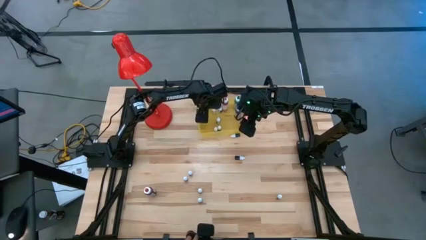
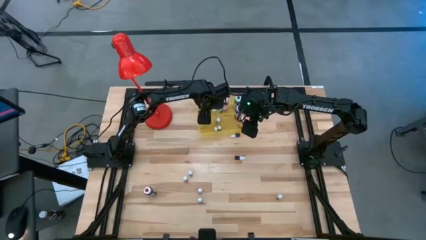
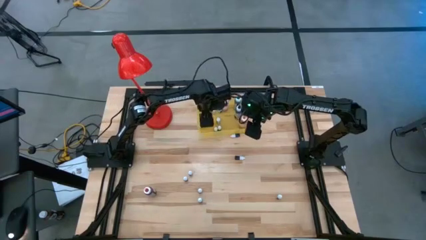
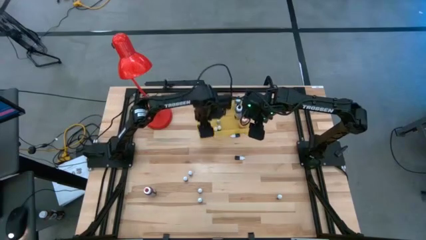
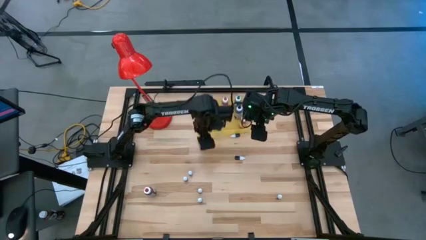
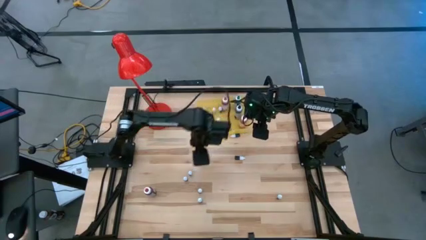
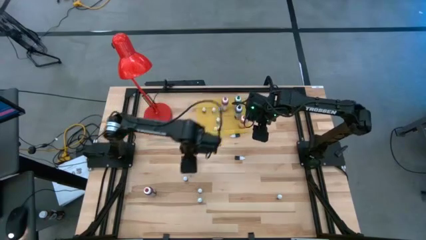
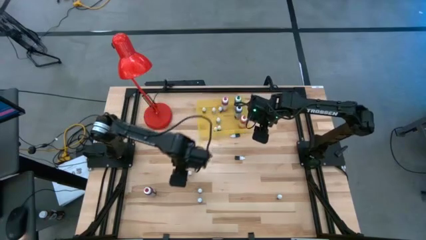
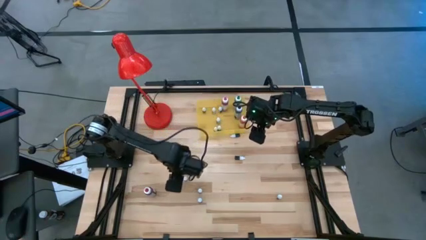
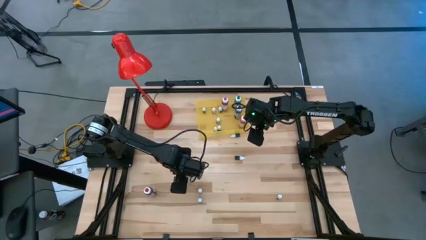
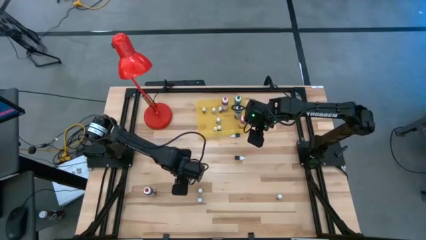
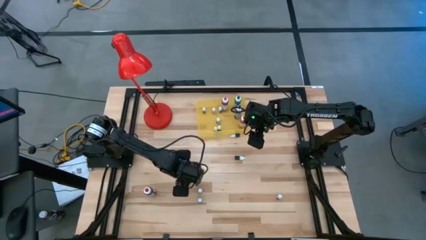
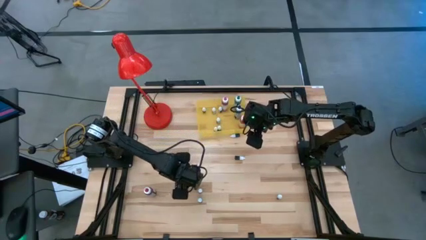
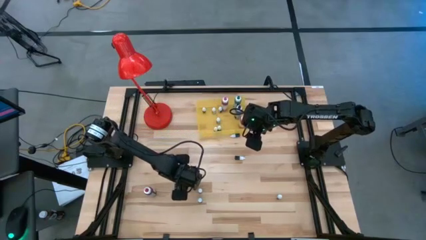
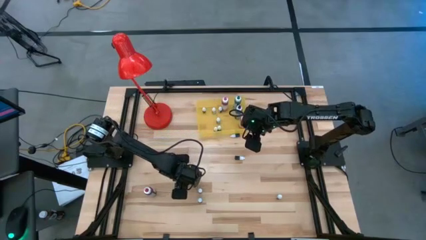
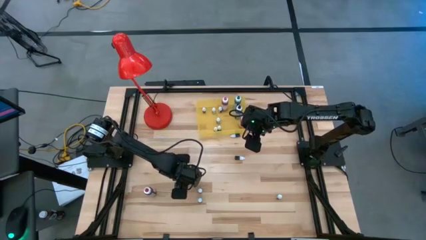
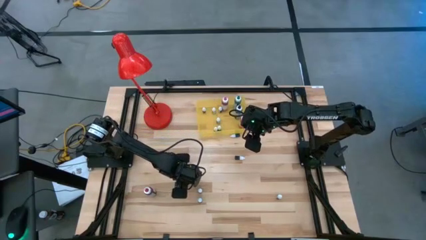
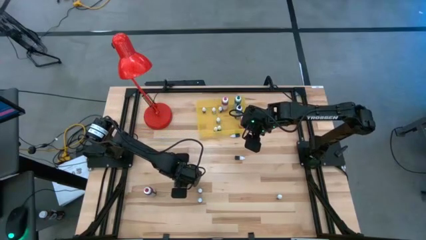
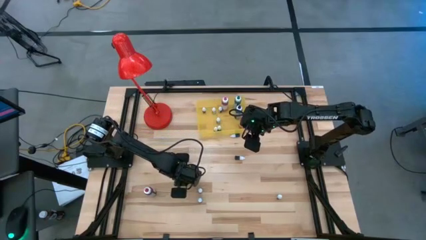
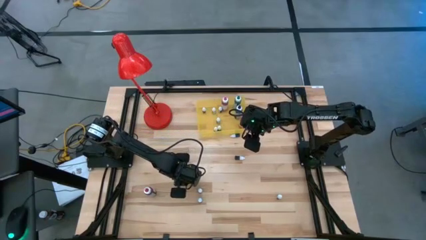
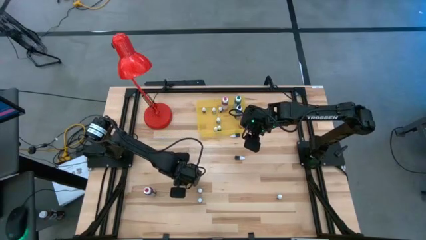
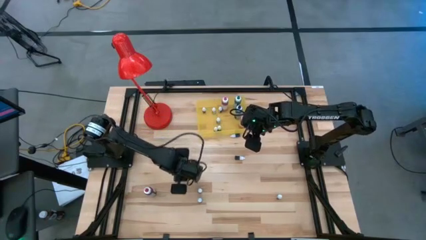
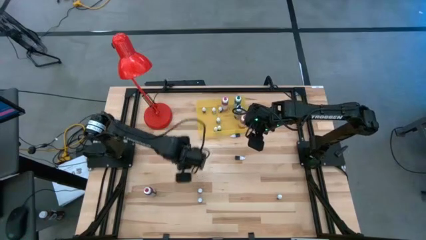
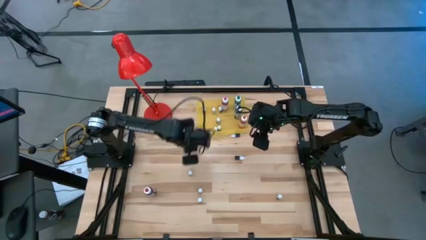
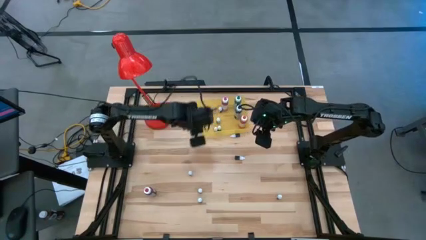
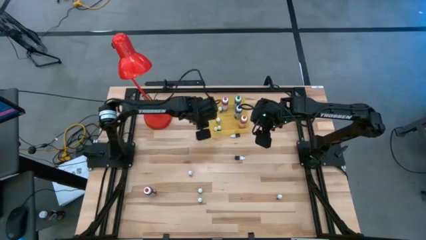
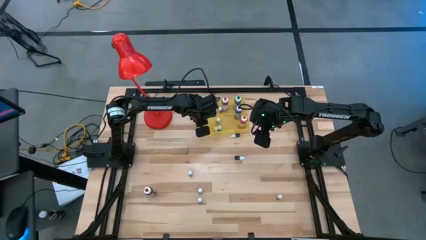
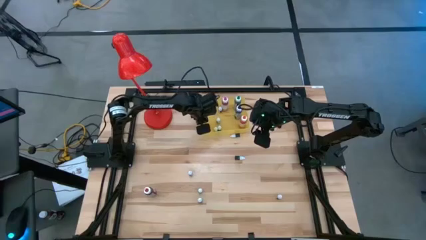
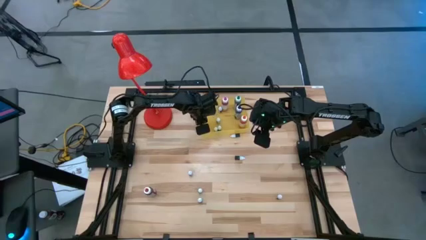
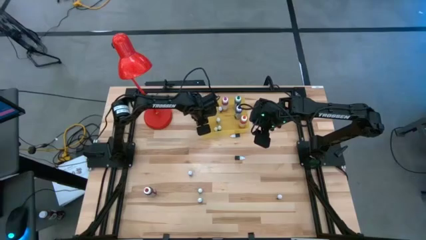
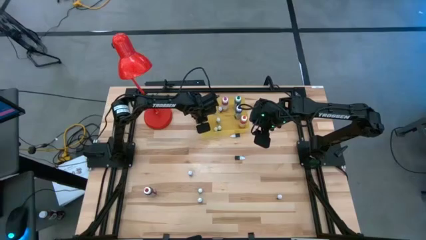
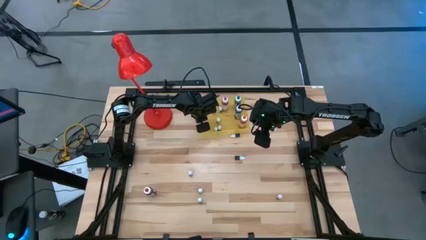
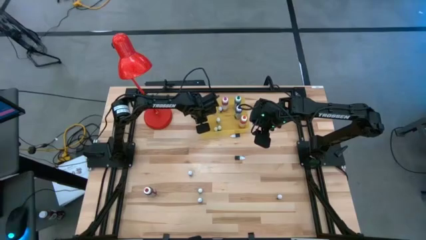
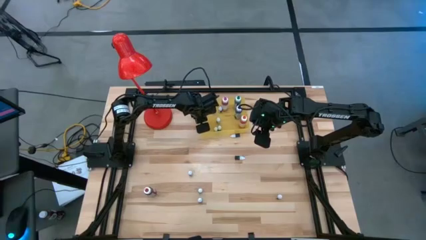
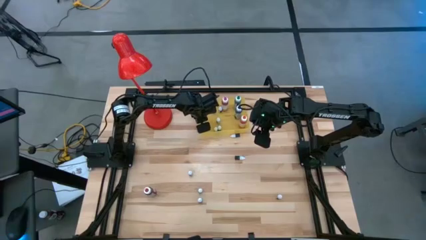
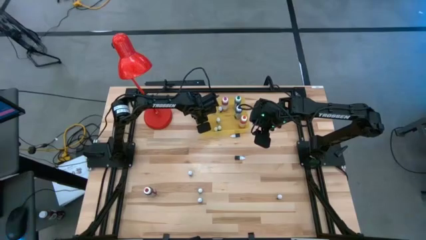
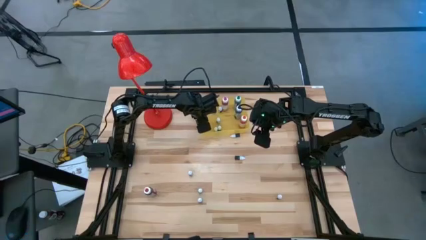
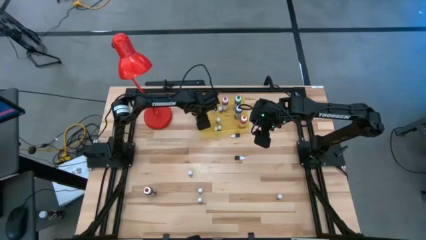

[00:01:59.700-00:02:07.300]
Task: Pick & Place food coloring
Put the small red food coloring bottle into the yellow bin

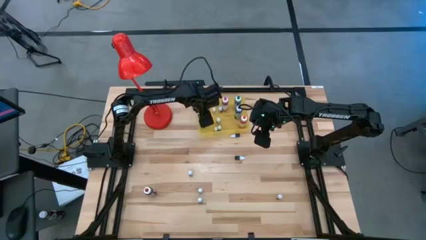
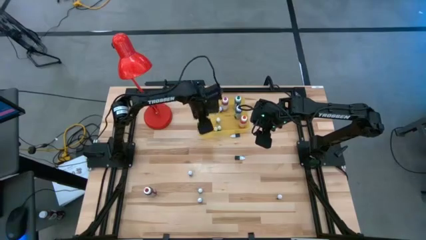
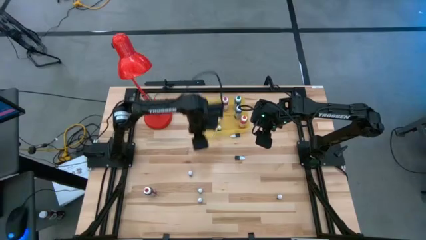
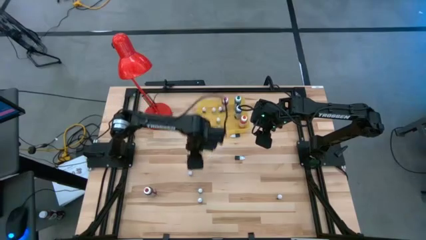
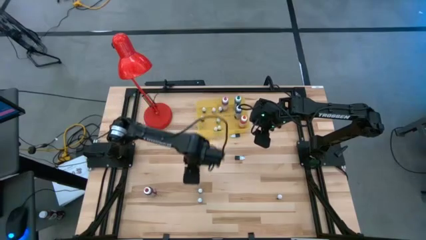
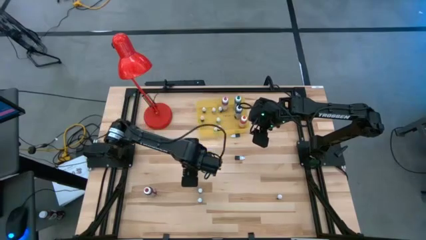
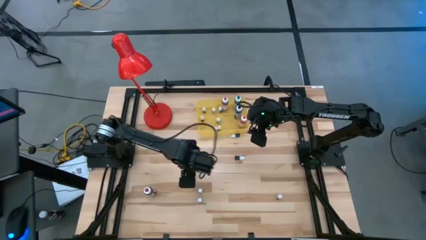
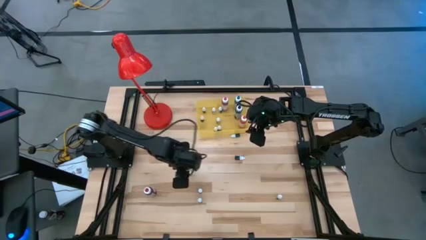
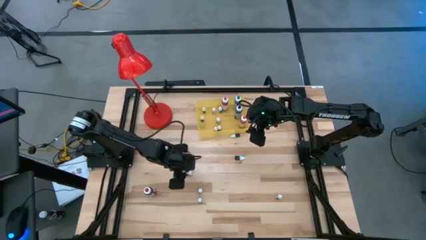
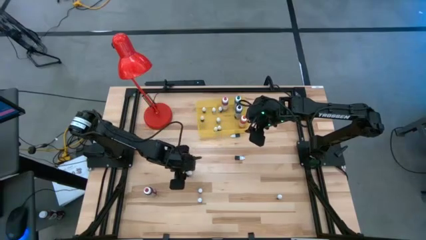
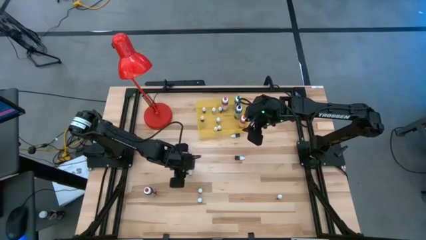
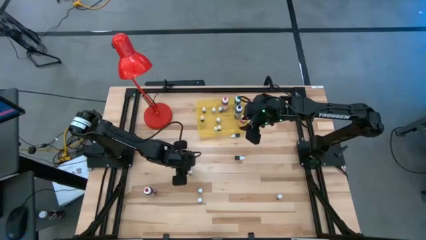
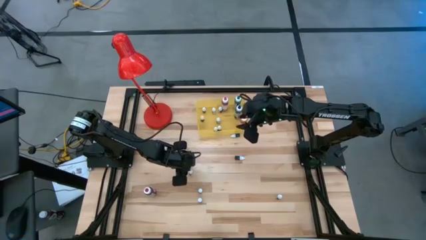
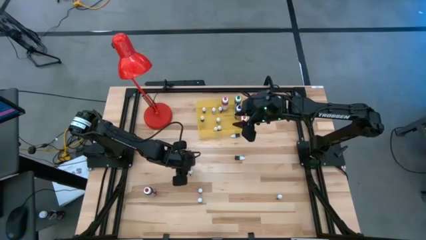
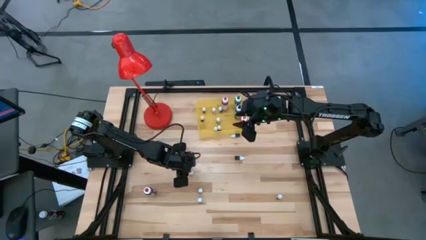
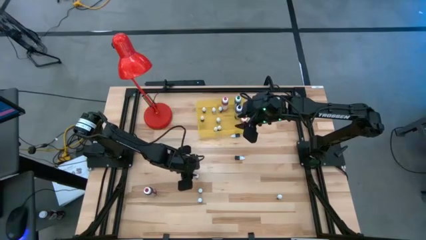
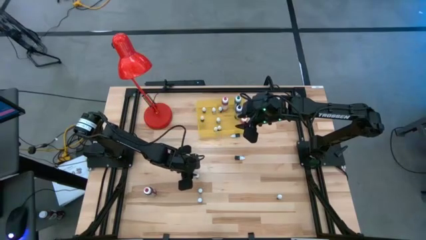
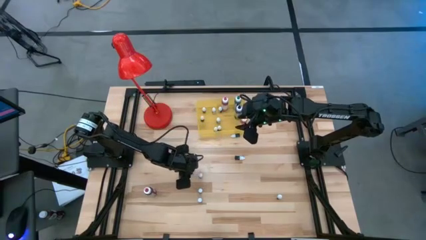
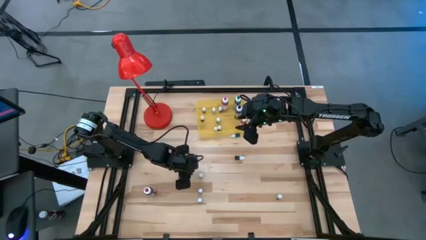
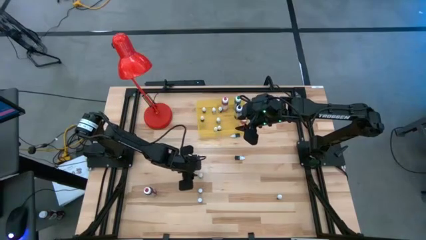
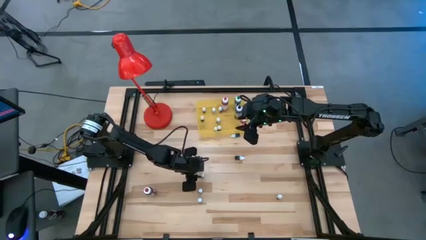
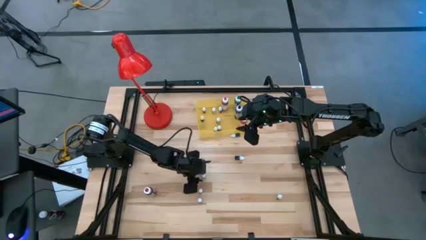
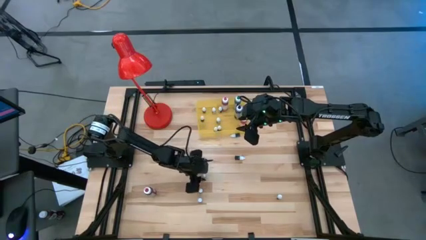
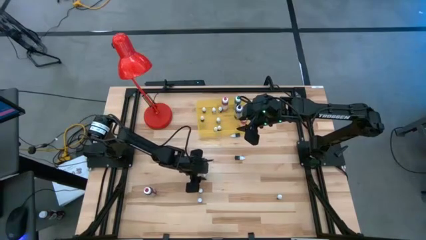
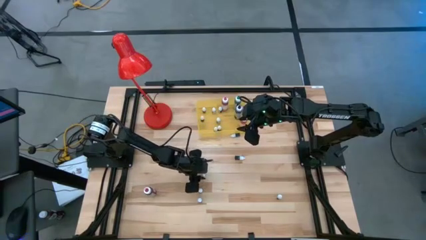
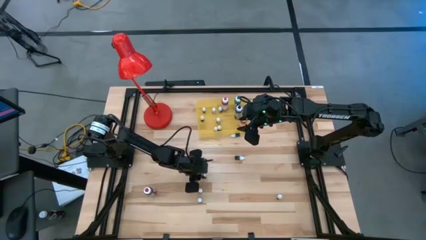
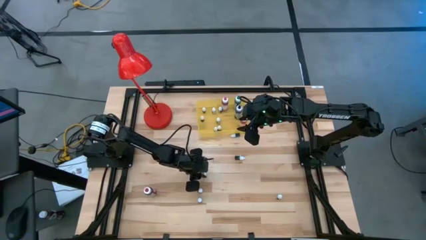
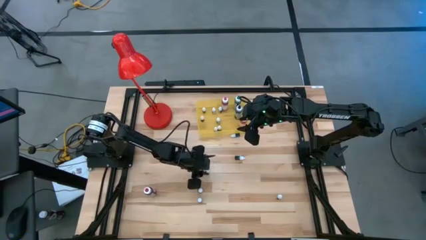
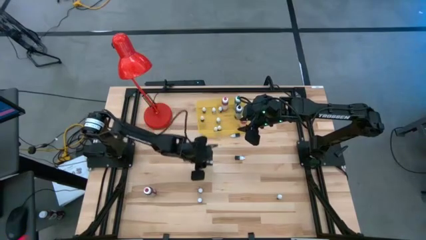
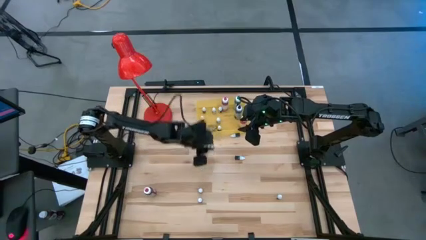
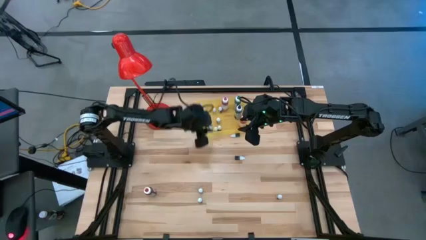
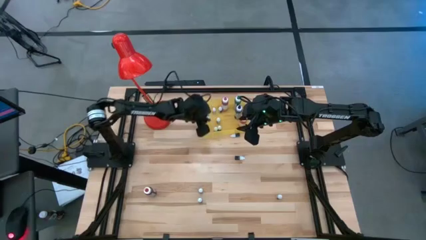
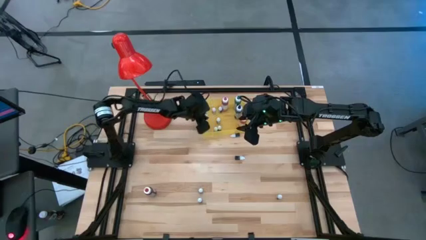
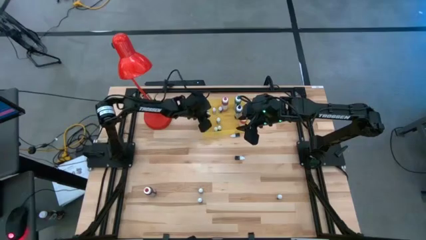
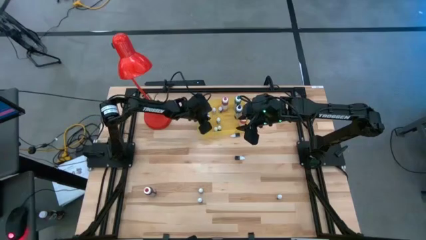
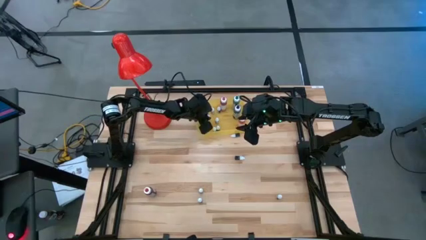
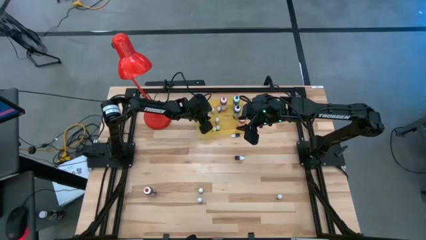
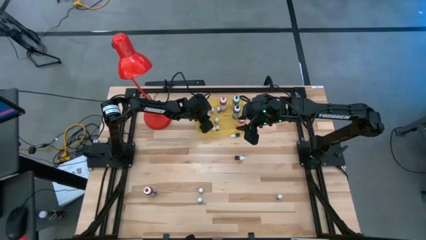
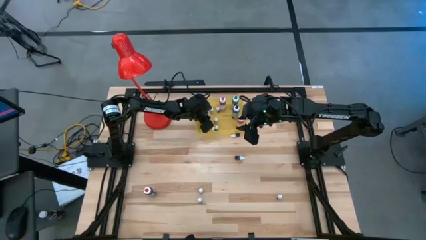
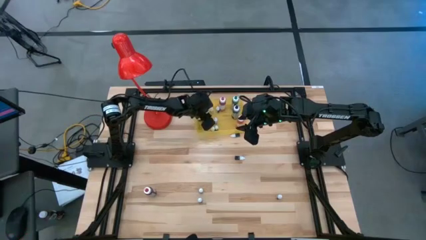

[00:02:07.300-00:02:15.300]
Put the small black food coloring bottle into the yellow bin
